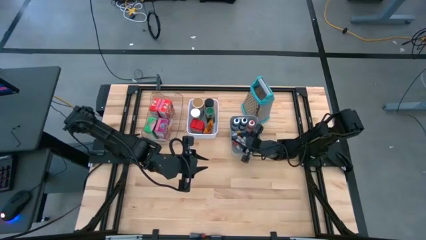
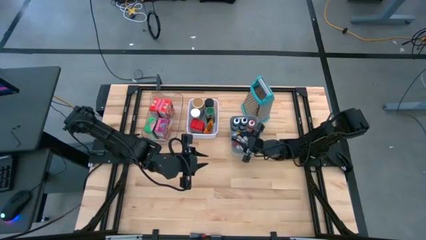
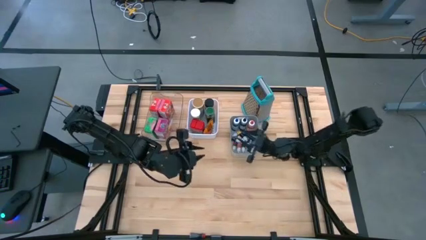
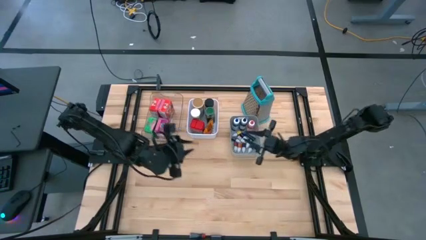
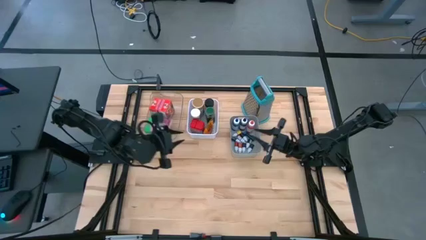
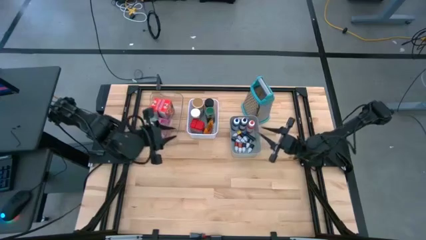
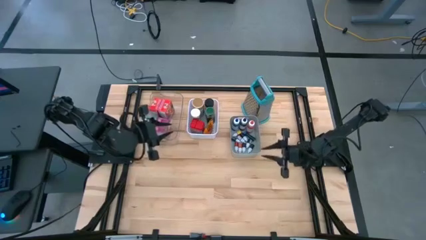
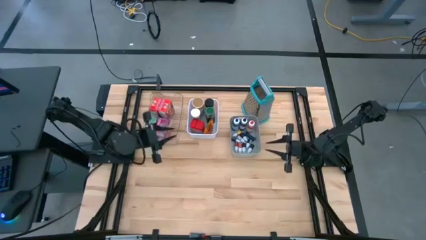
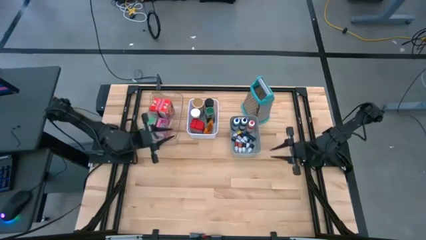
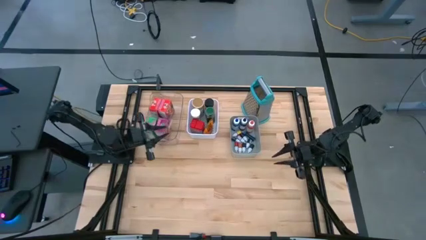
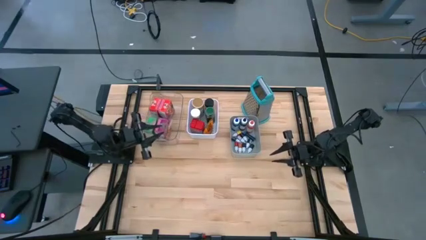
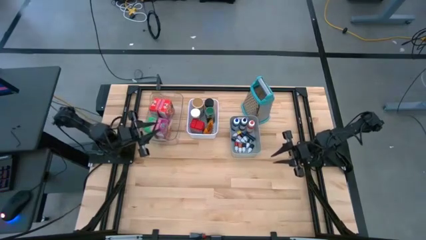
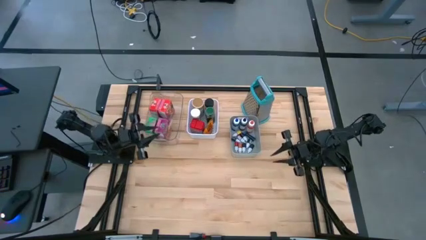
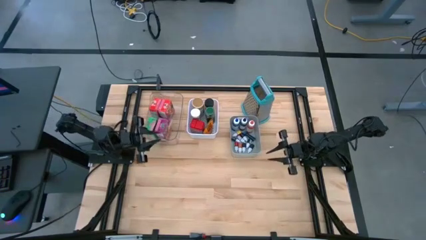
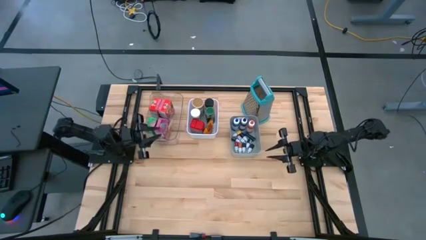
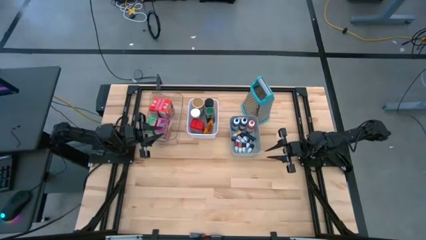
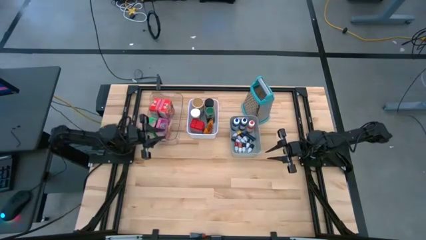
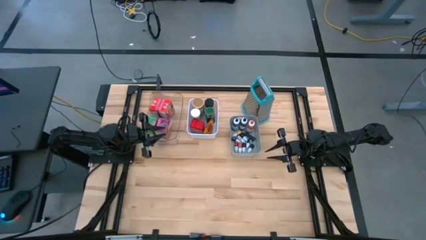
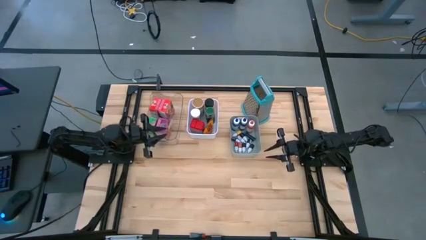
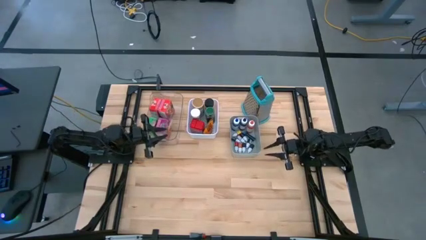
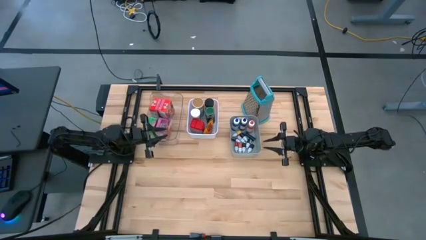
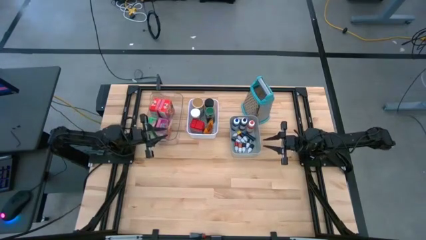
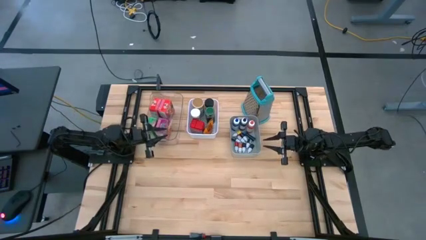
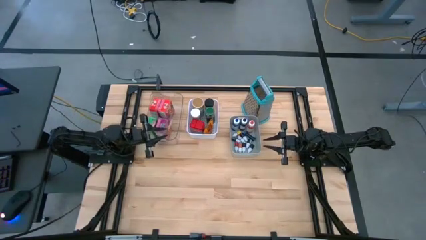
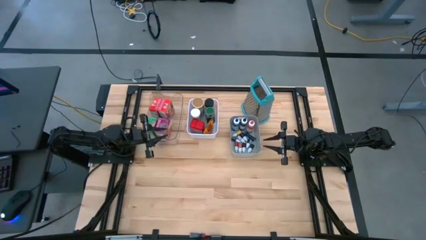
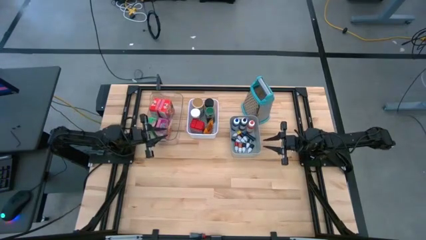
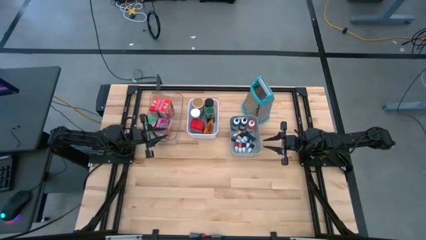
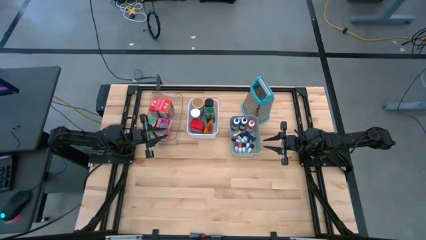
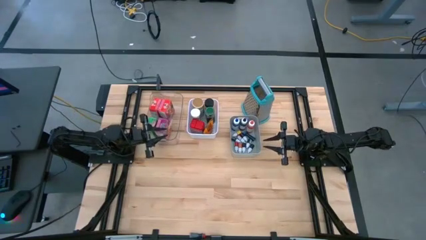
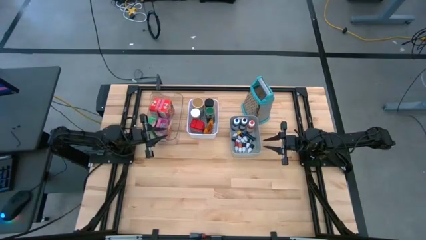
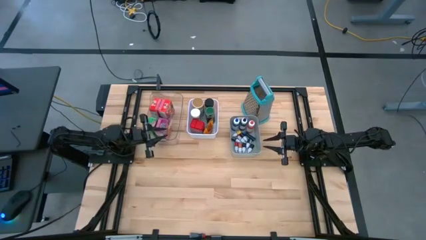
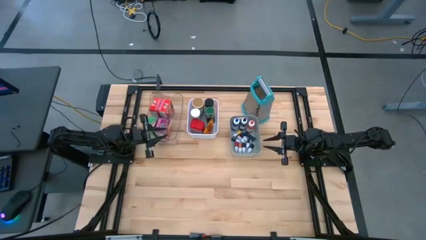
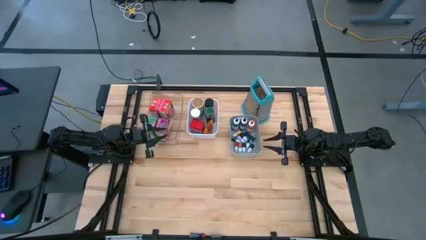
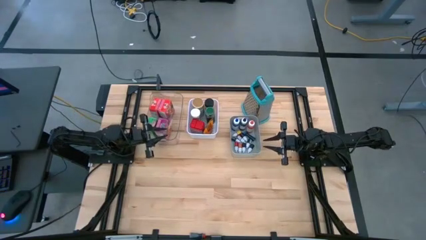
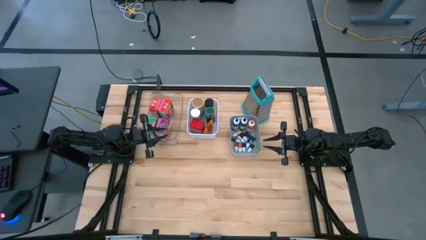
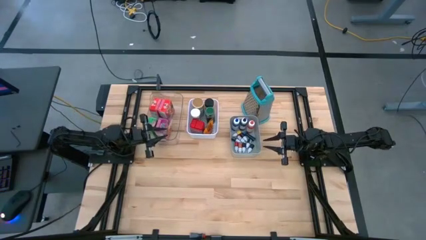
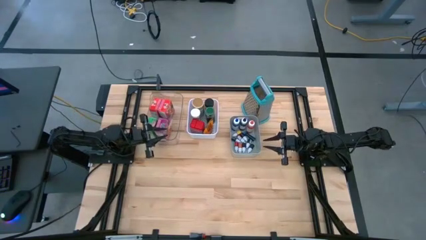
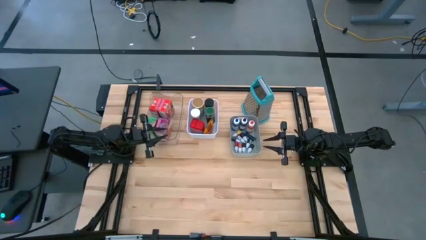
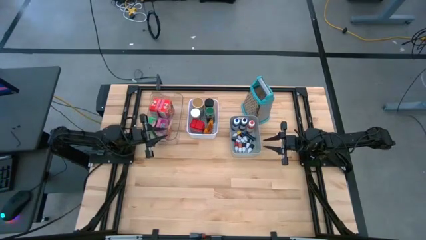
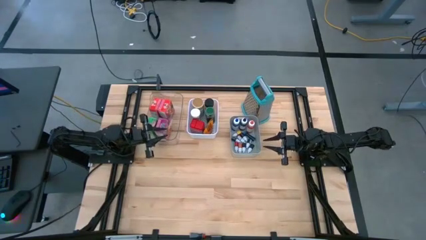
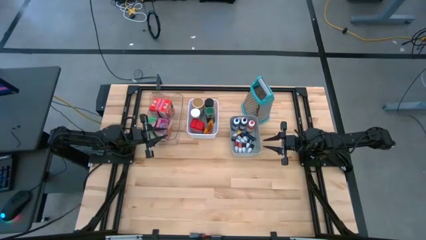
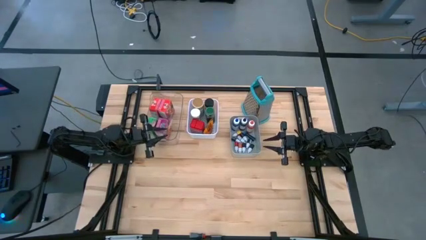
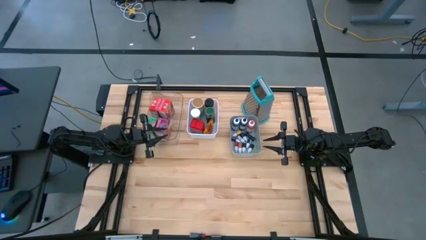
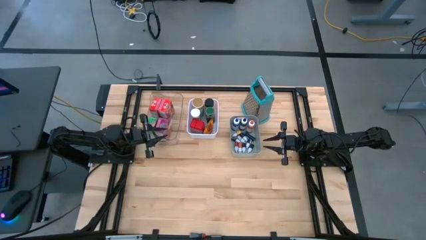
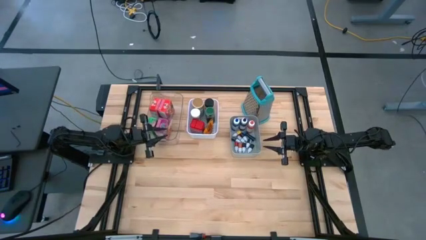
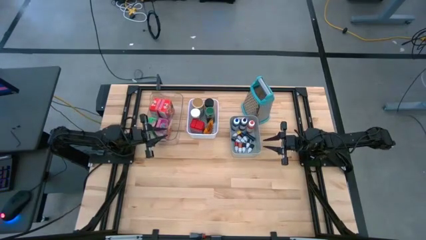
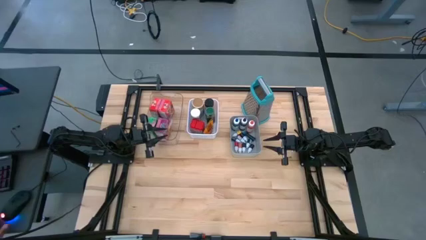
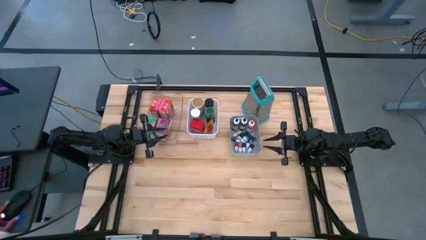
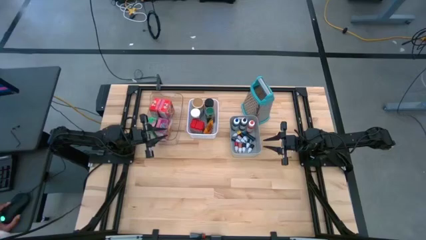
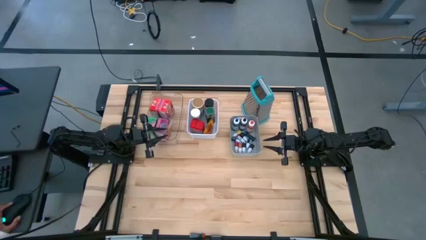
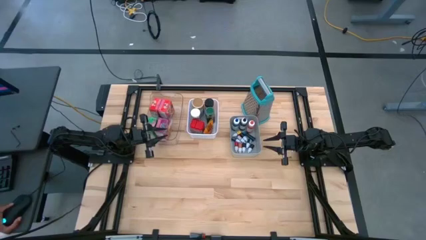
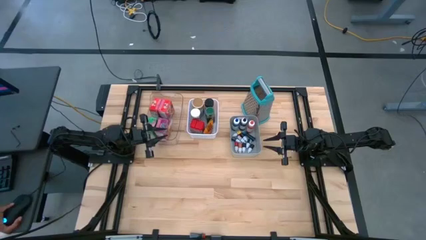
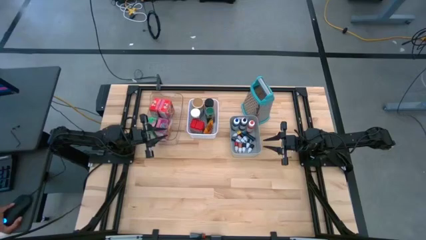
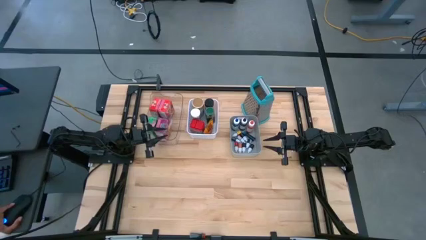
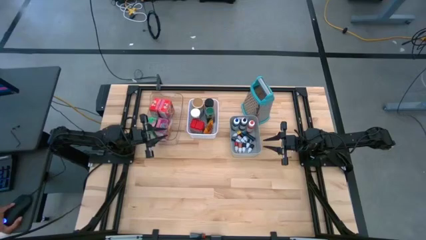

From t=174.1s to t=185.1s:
Task: Pick & Place Kitchen Items
Return to home position
